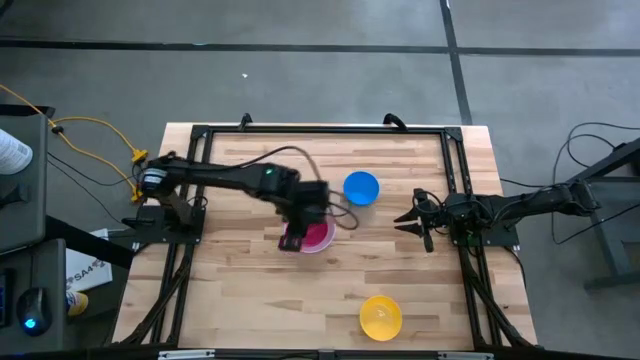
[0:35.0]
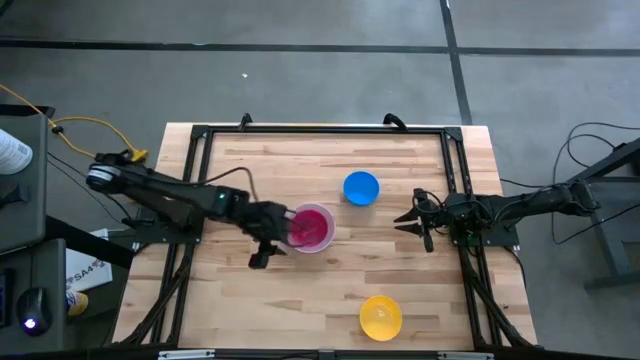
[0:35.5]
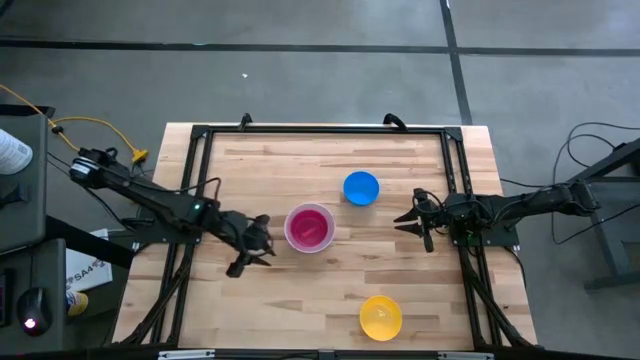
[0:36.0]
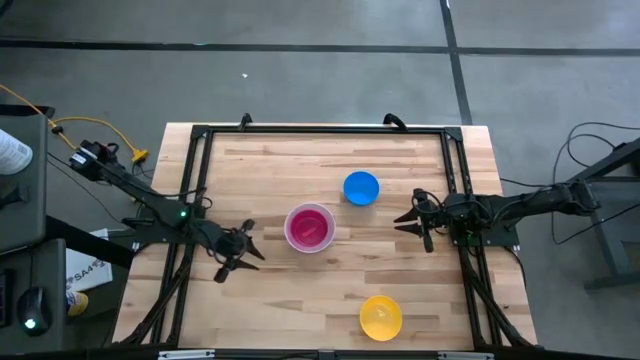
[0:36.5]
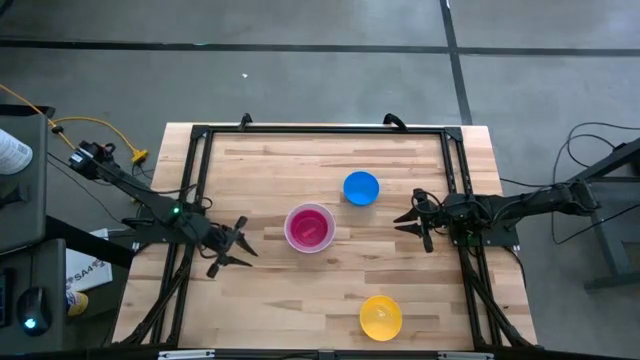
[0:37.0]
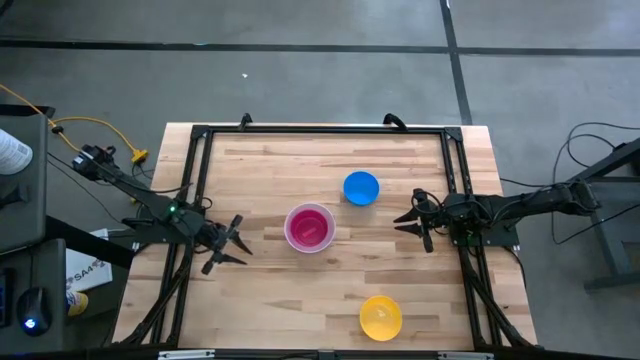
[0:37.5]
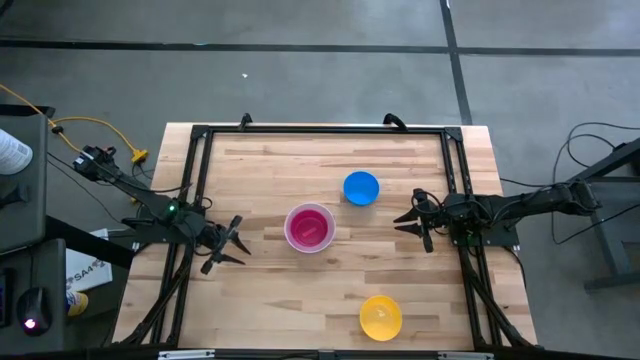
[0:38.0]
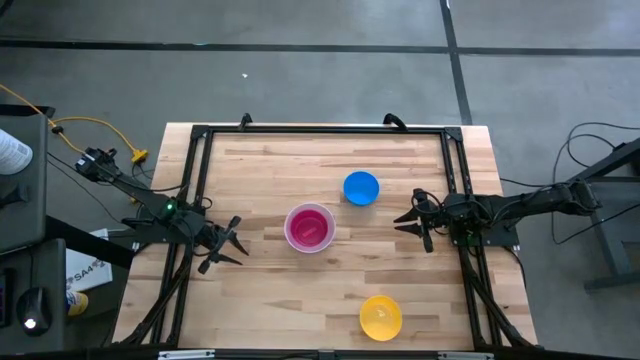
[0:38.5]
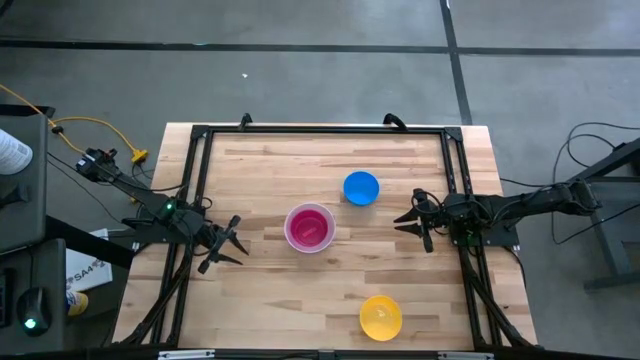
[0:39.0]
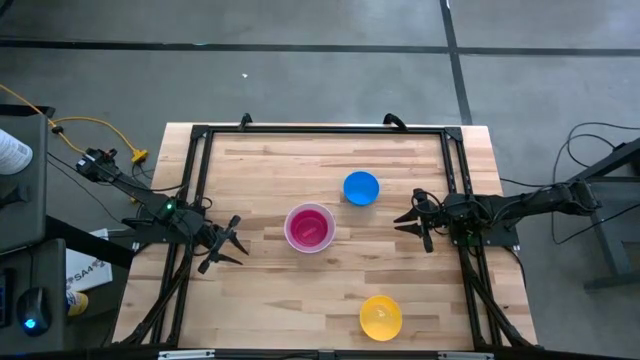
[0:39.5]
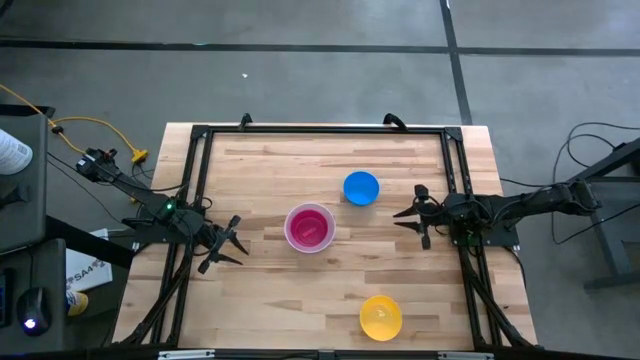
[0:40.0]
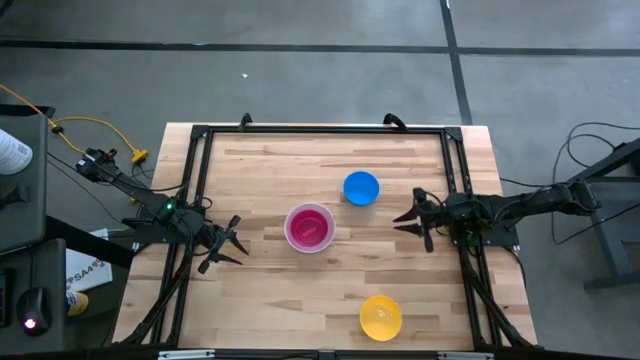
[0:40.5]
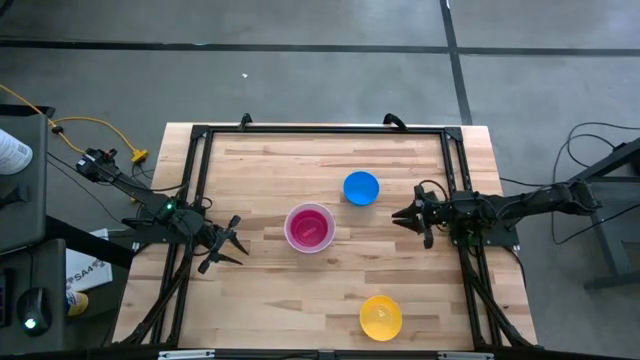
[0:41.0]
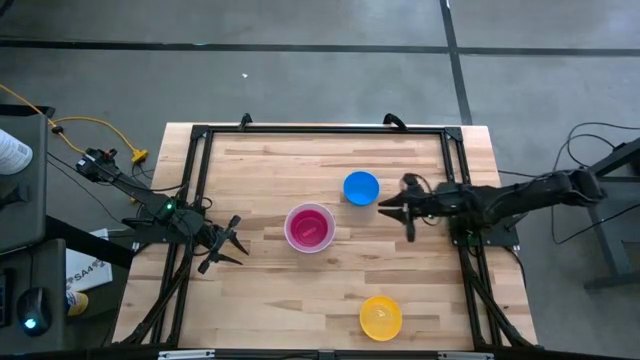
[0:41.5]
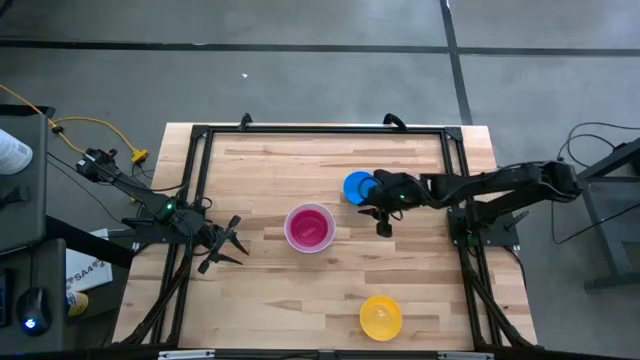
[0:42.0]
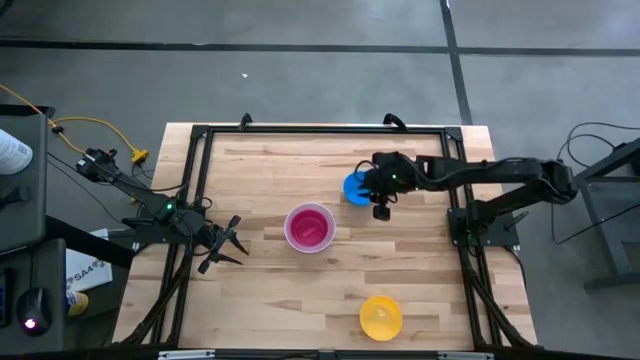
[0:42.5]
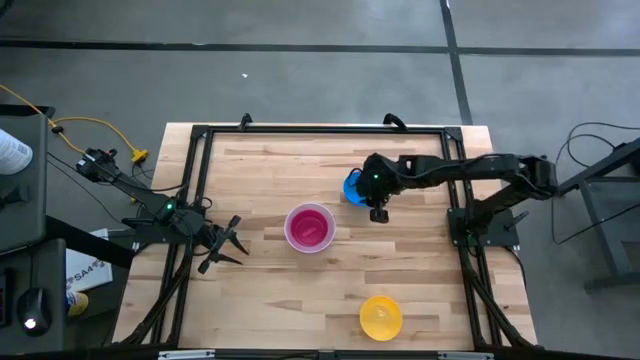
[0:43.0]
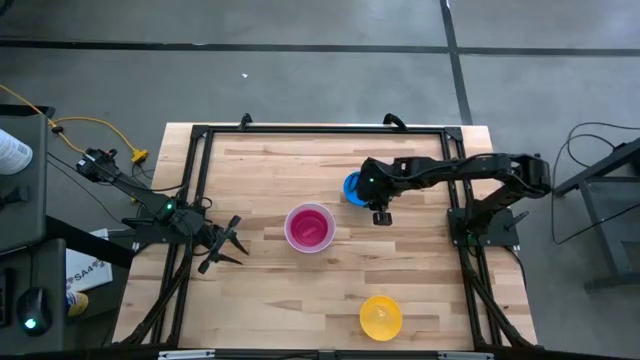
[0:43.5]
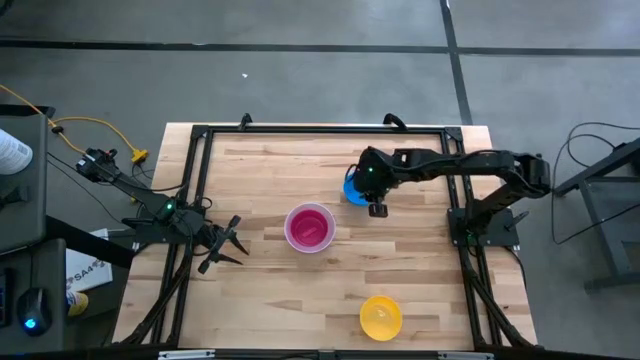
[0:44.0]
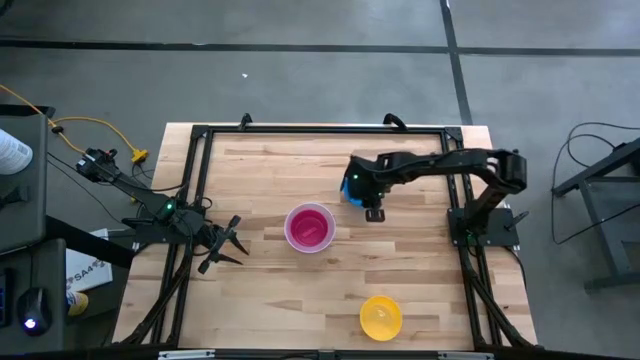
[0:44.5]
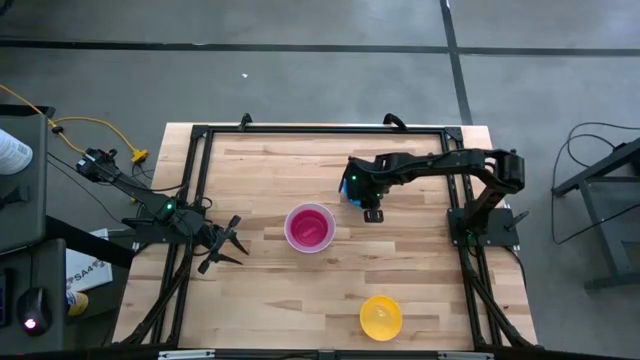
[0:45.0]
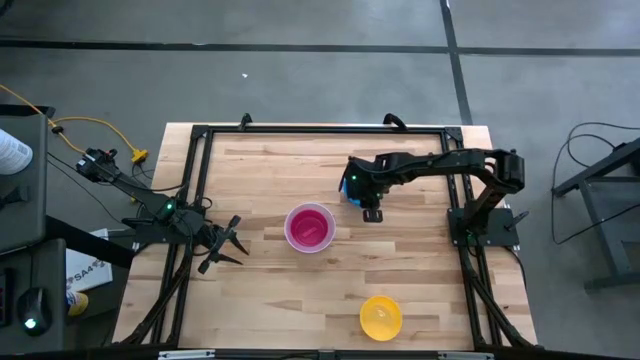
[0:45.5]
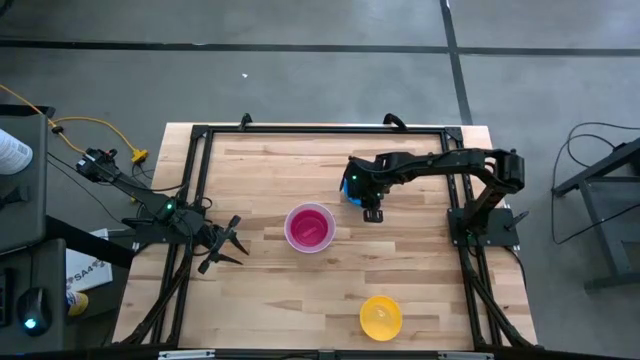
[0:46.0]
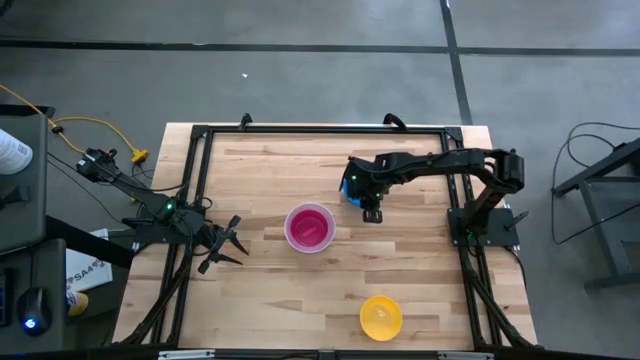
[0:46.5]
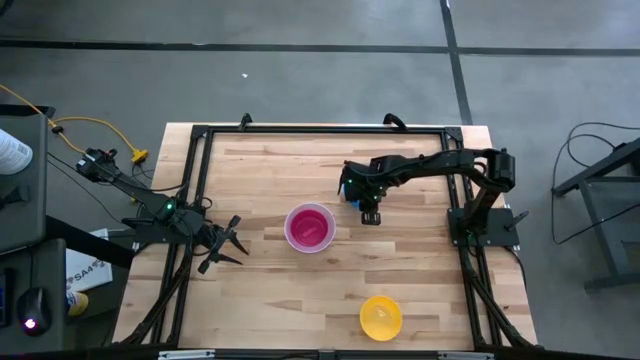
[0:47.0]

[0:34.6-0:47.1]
Stack the blue bowl into the pink bowl
